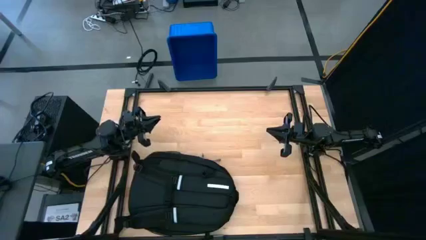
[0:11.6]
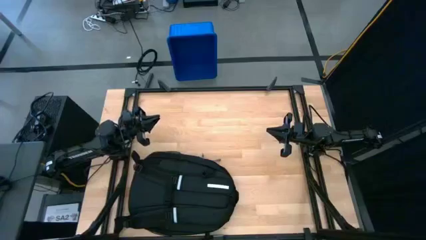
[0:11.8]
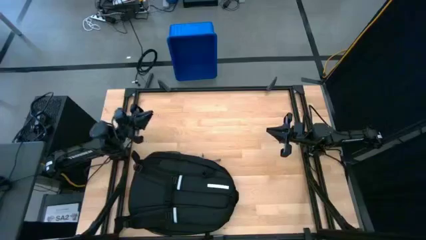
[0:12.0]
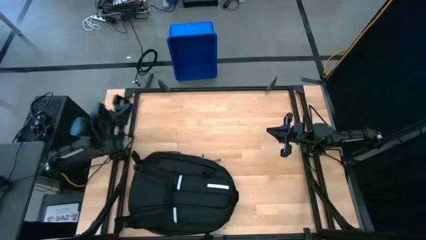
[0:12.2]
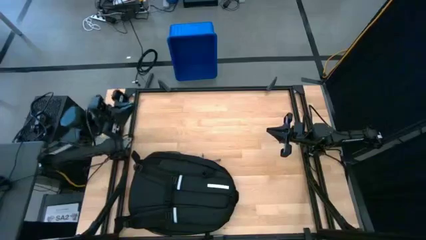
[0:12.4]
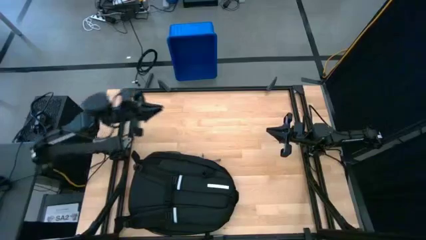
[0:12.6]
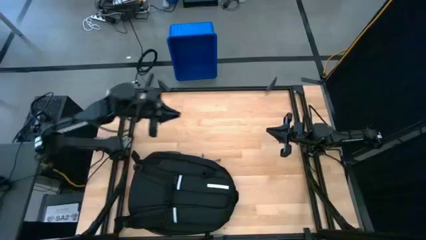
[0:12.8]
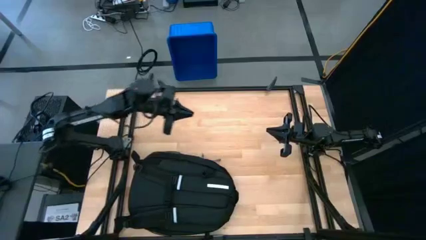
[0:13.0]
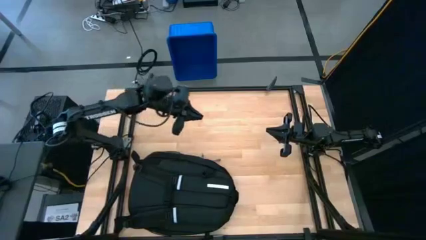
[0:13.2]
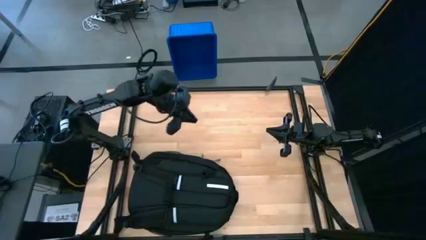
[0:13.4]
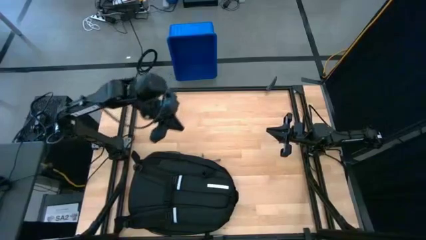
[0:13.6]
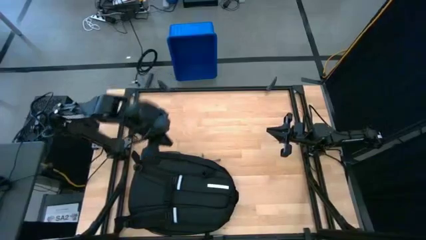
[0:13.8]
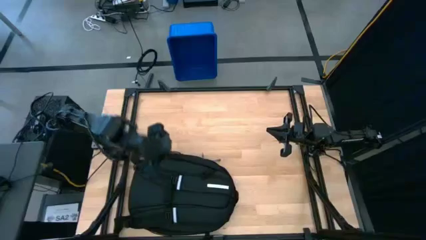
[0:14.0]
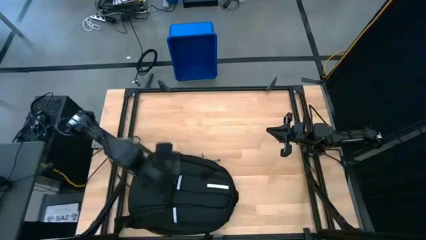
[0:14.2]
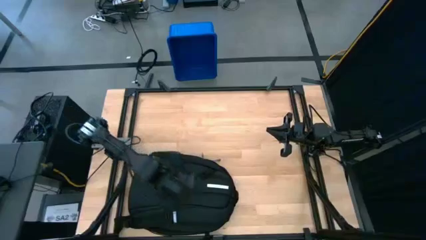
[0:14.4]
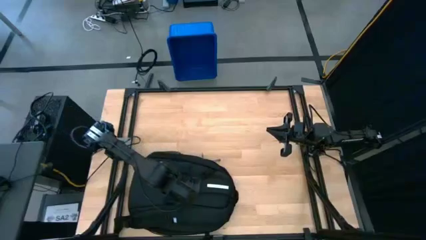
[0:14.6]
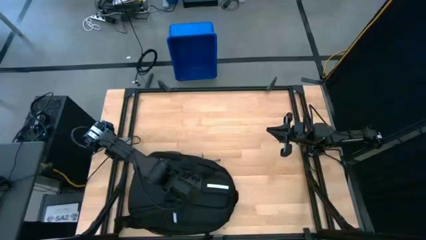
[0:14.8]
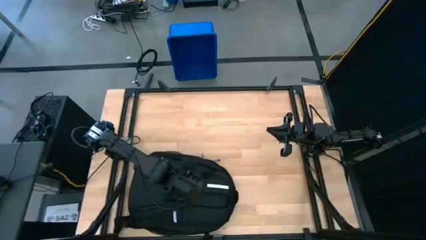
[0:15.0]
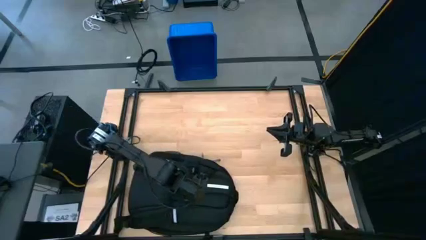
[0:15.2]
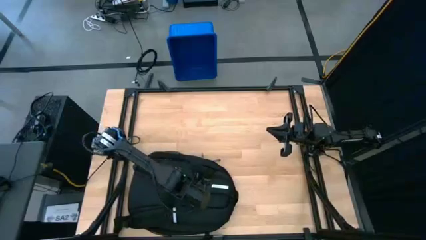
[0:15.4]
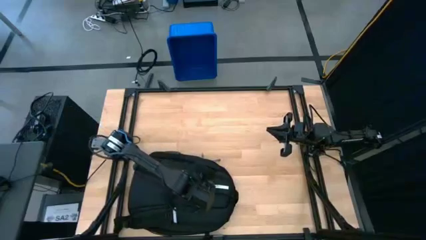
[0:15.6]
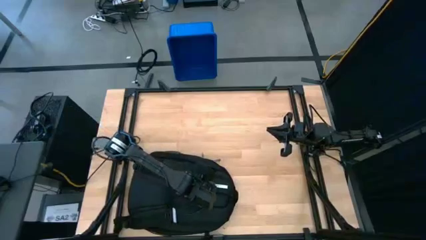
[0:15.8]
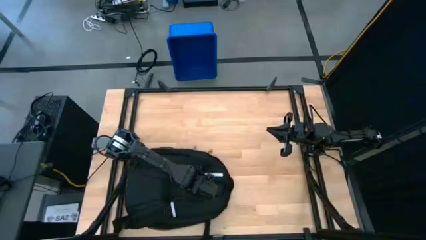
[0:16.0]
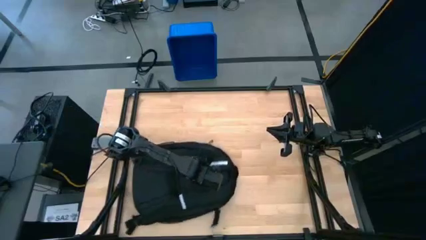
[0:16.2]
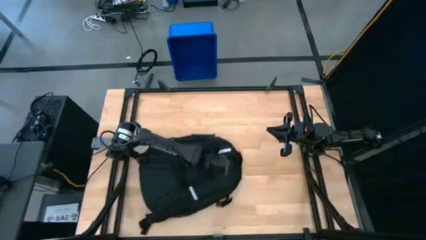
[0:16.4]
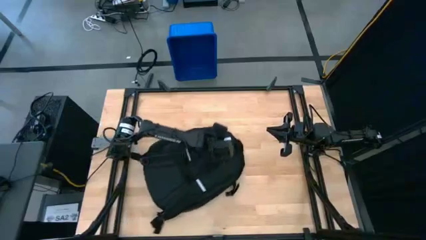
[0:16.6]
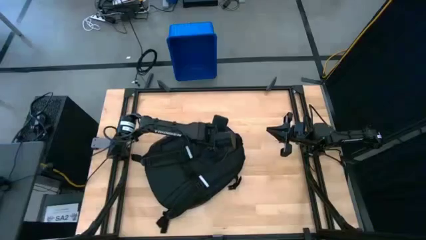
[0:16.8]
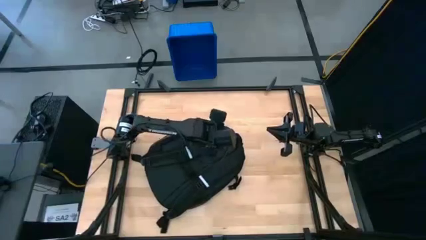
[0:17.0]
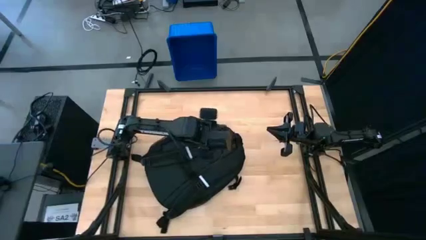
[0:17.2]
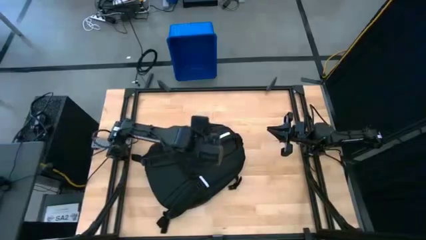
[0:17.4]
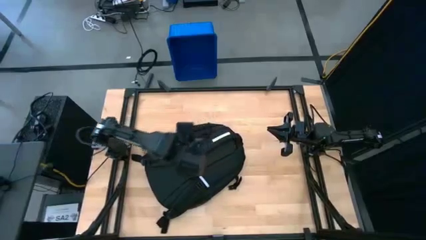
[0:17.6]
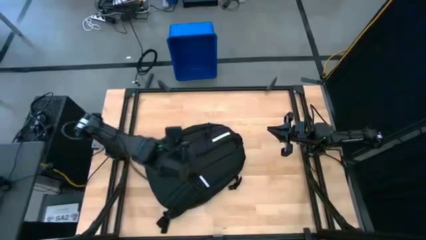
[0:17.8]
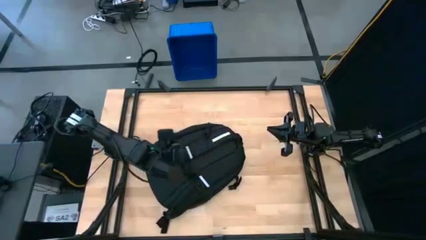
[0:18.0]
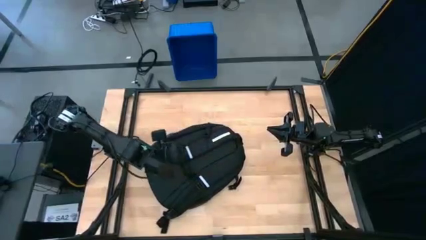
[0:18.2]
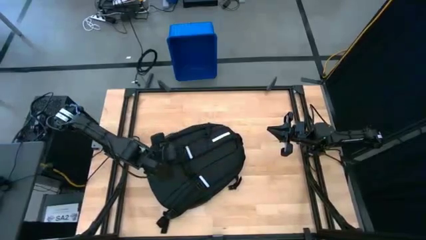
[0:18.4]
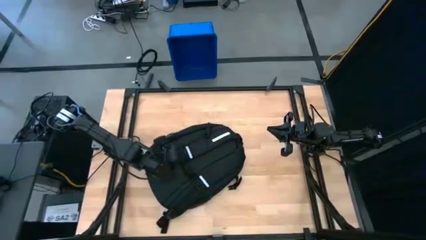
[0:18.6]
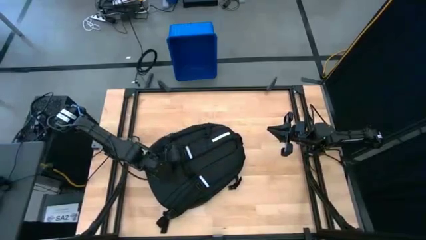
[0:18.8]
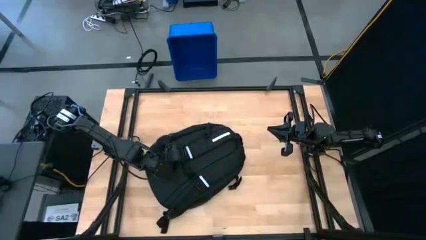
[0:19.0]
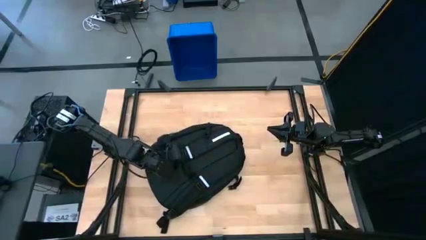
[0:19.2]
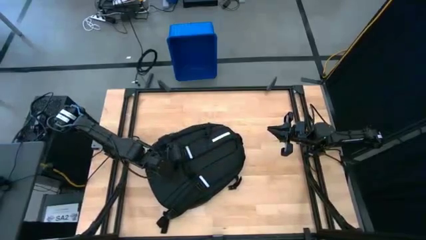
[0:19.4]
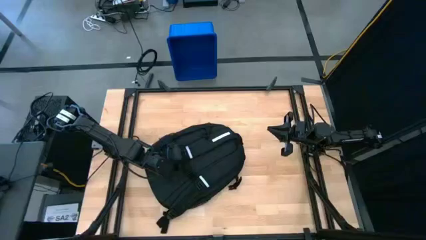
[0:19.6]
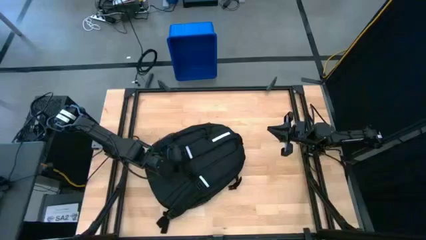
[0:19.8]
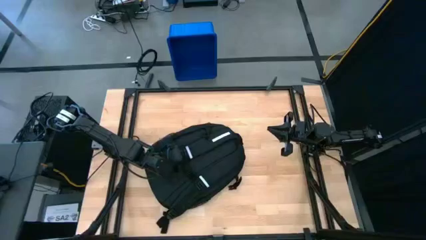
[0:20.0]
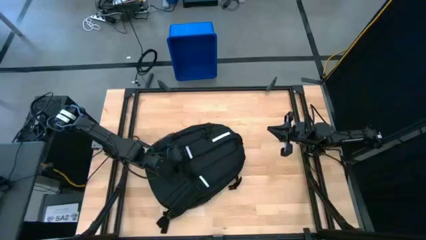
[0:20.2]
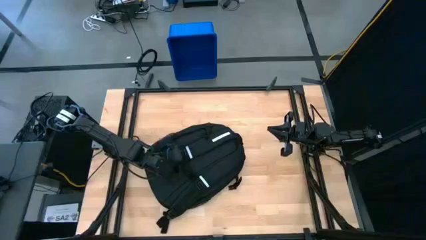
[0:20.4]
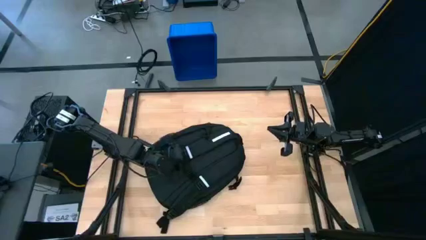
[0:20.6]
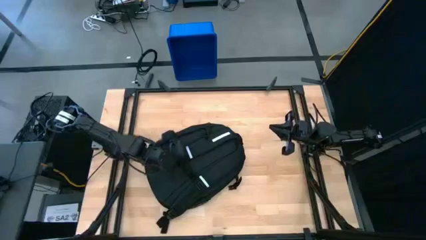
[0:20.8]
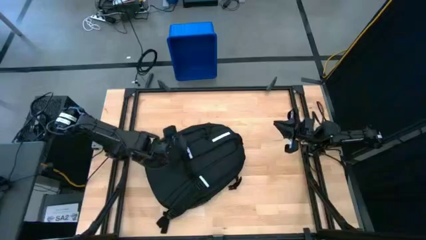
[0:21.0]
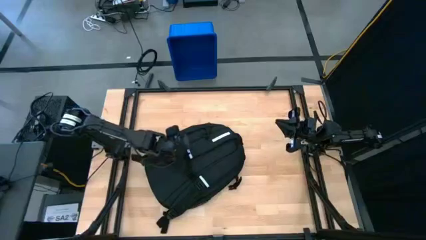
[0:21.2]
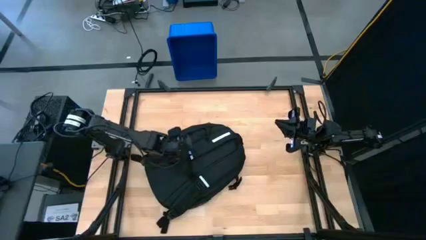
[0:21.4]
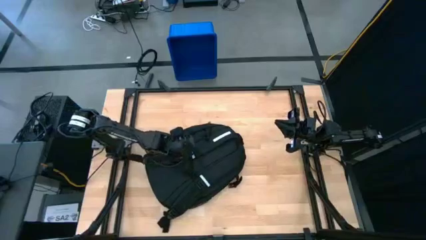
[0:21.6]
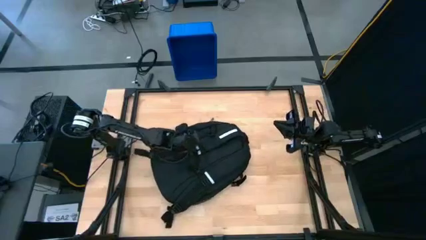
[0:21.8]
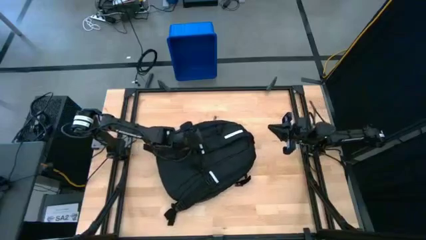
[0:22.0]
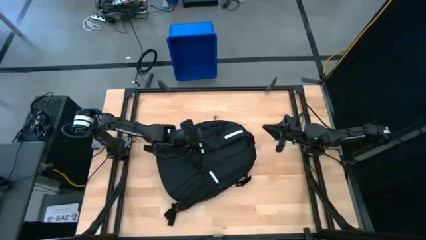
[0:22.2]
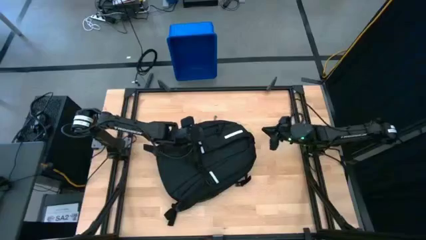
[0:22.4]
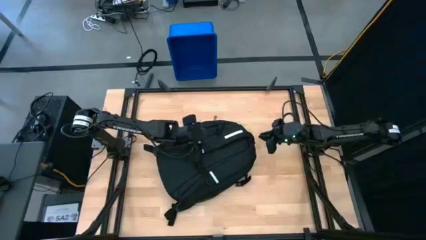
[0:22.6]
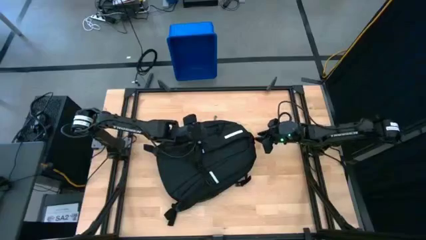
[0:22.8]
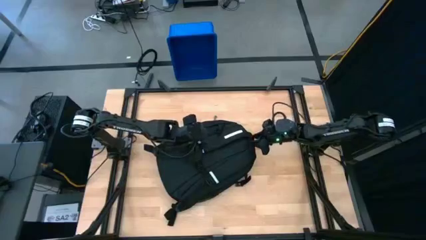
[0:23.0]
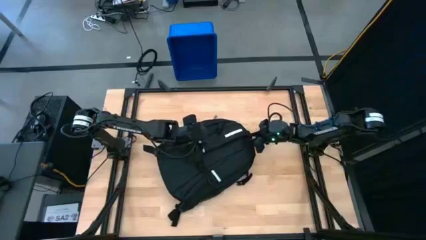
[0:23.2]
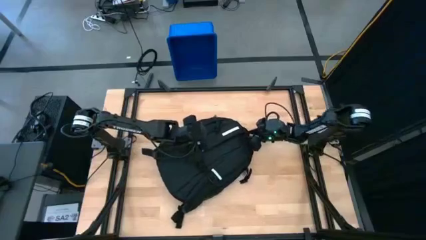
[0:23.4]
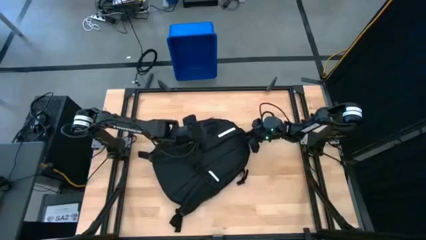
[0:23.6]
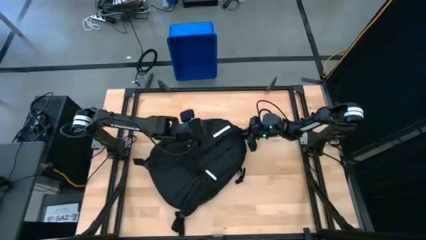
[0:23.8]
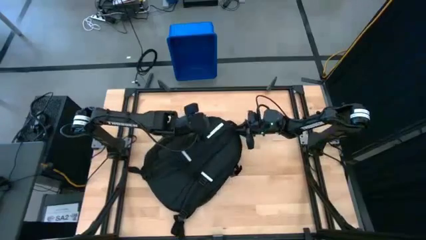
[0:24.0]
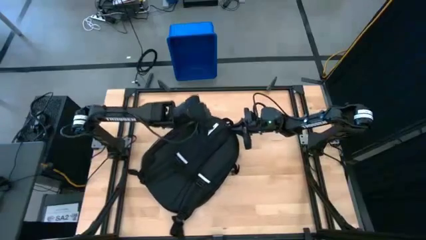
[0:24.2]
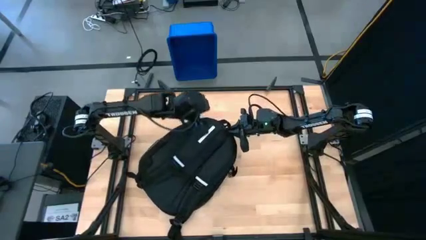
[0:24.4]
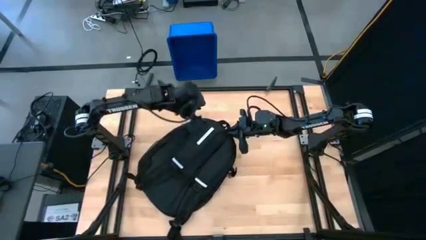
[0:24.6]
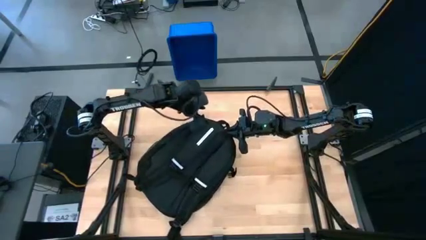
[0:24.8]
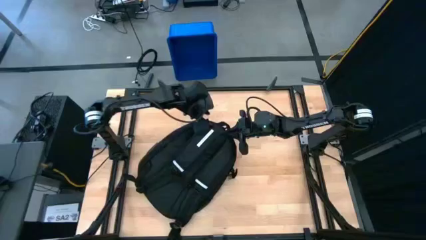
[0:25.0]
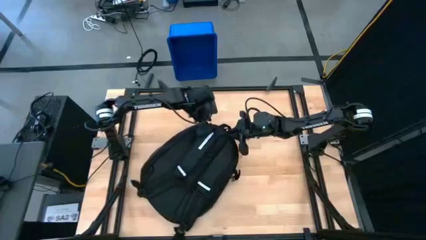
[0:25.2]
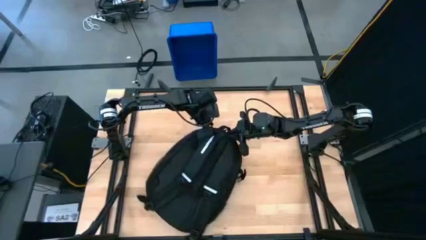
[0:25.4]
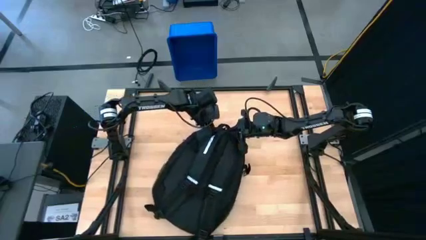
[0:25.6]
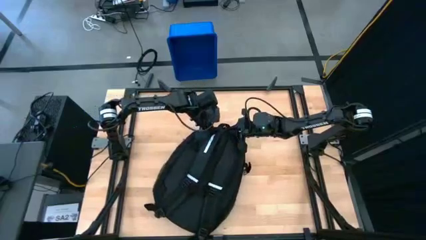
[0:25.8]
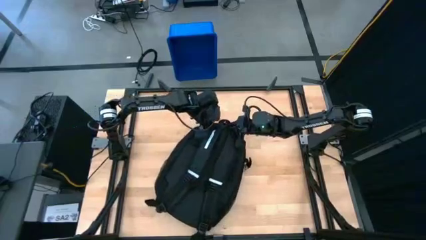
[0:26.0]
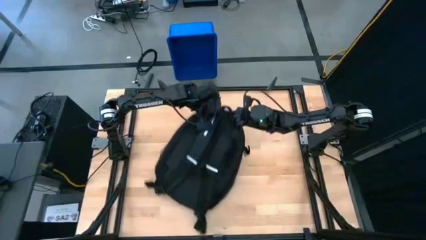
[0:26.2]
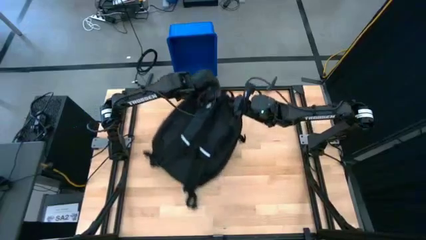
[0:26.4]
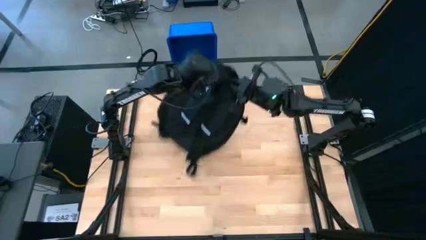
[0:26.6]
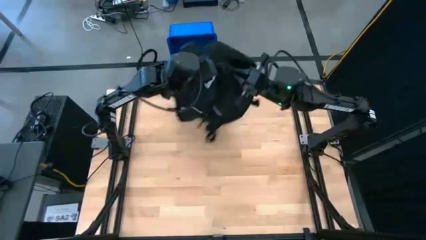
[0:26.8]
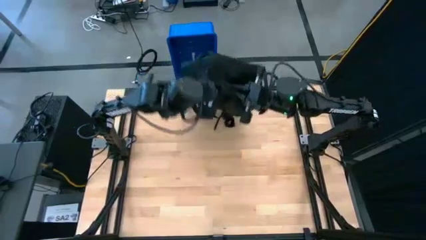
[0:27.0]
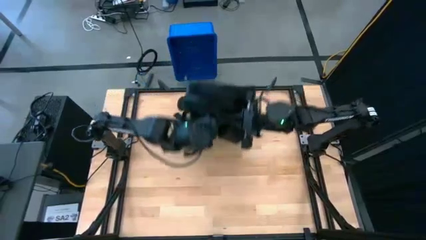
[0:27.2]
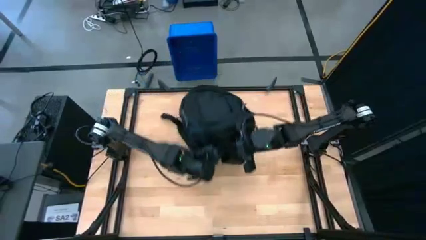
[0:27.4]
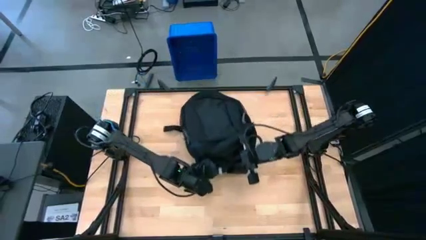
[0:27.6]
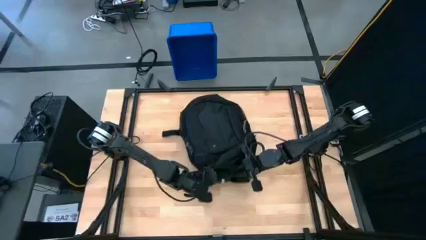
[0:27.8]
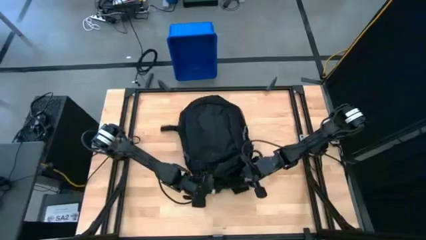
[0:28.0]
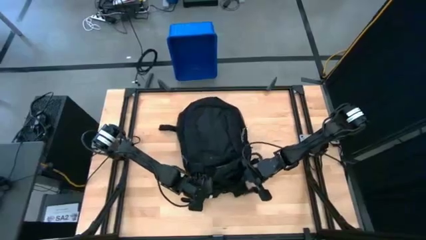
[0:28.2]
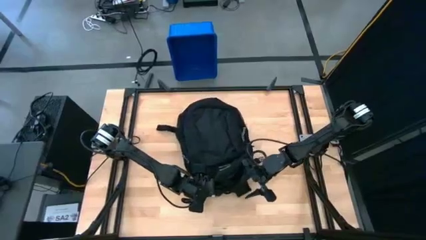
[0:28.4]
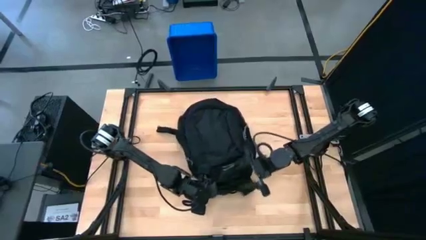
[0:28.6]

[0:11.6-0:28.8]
Task: Unpack backpack
Open the backpack
